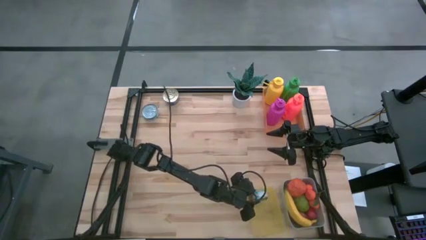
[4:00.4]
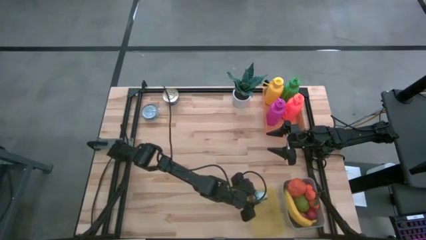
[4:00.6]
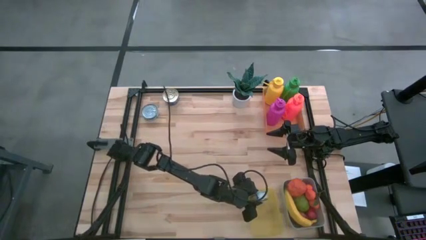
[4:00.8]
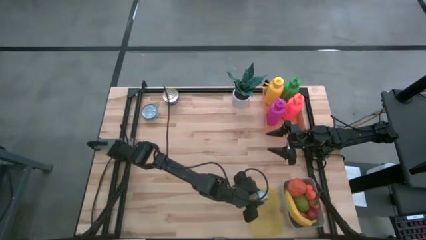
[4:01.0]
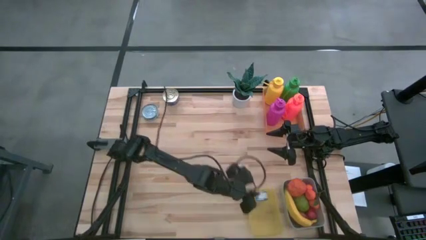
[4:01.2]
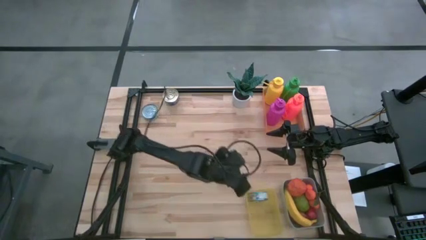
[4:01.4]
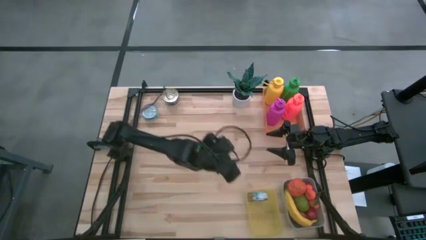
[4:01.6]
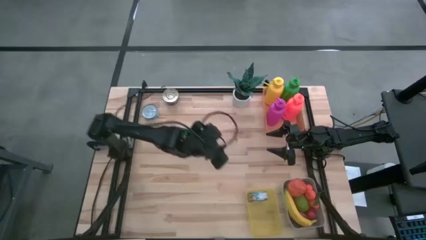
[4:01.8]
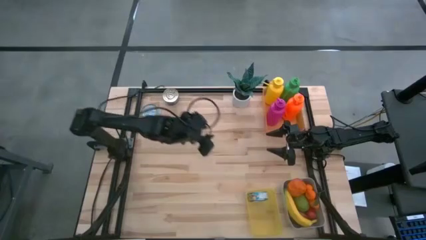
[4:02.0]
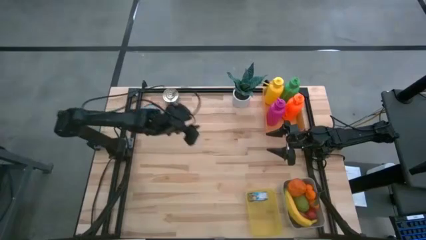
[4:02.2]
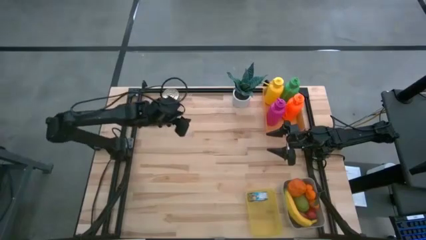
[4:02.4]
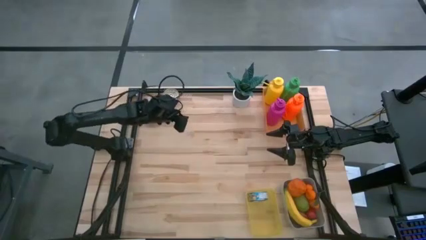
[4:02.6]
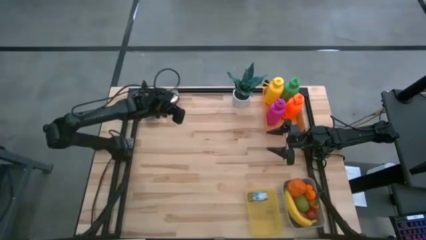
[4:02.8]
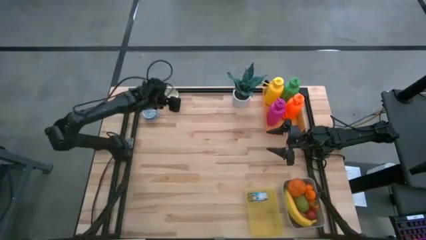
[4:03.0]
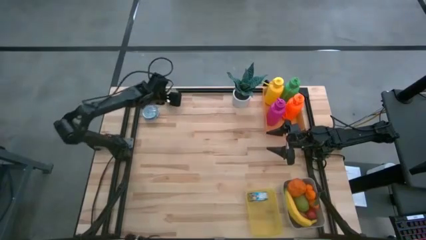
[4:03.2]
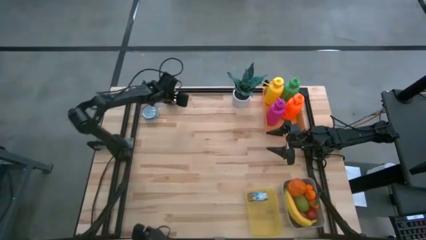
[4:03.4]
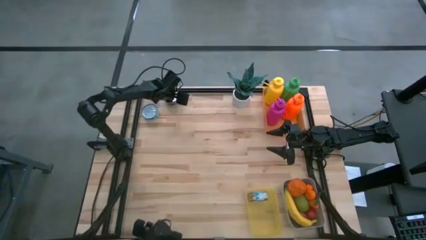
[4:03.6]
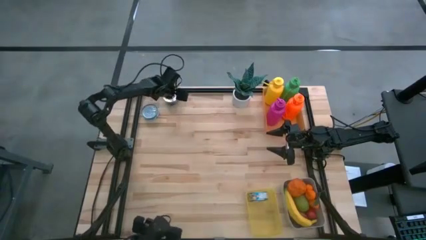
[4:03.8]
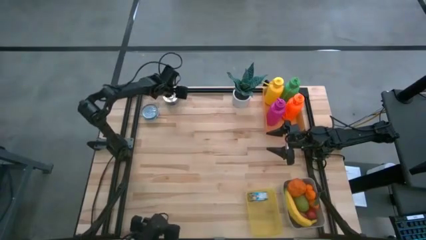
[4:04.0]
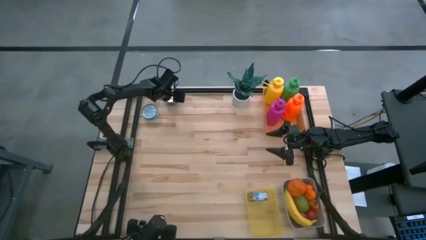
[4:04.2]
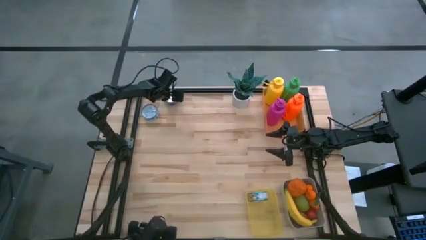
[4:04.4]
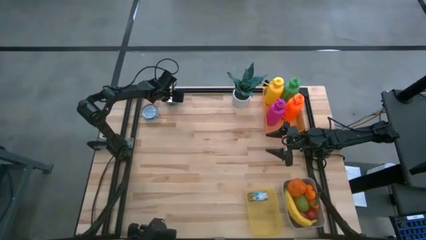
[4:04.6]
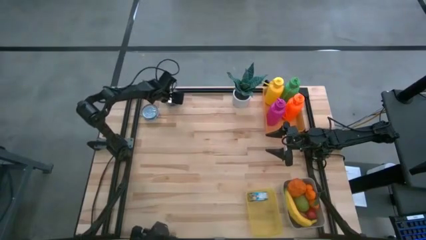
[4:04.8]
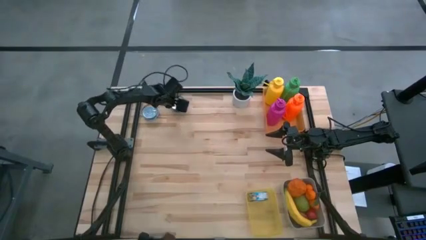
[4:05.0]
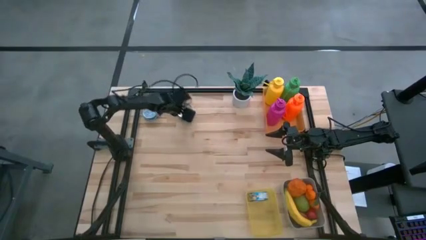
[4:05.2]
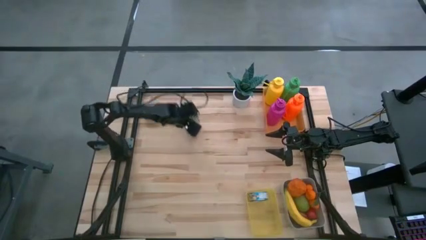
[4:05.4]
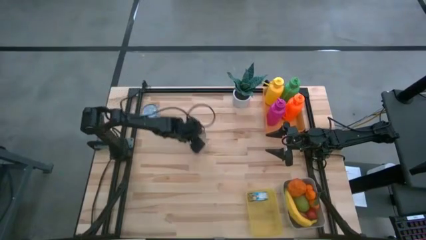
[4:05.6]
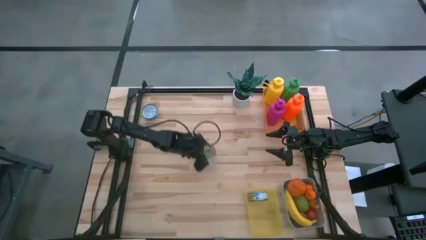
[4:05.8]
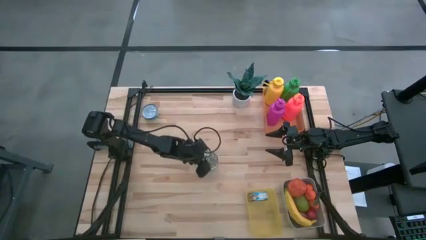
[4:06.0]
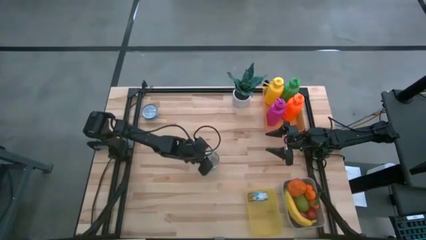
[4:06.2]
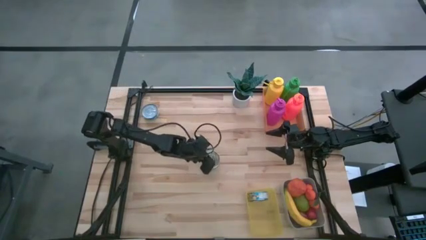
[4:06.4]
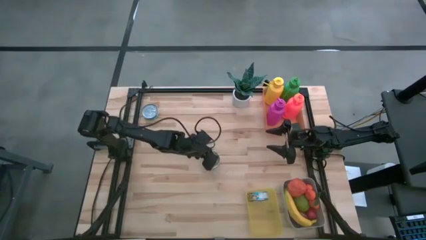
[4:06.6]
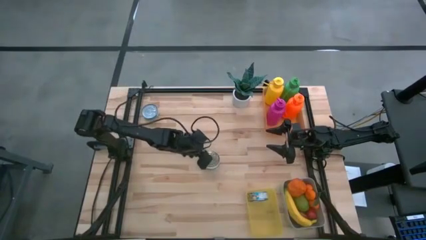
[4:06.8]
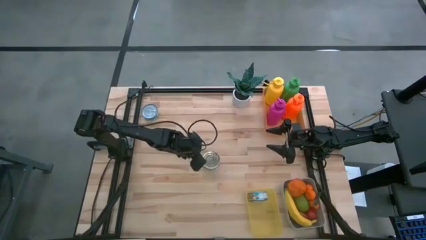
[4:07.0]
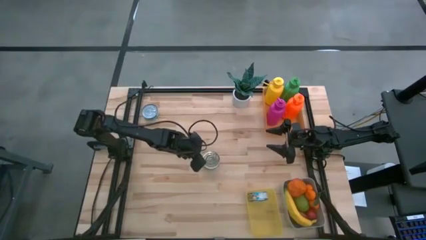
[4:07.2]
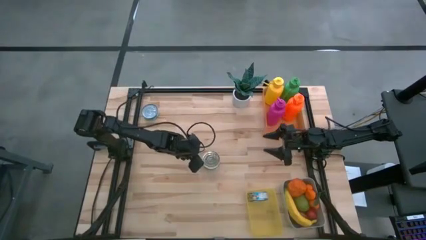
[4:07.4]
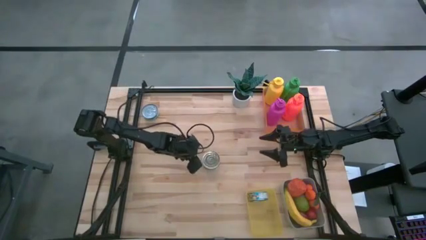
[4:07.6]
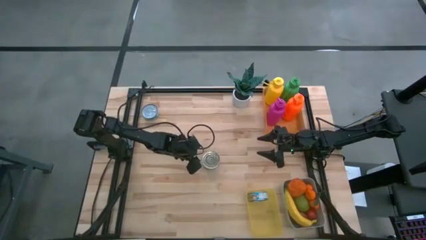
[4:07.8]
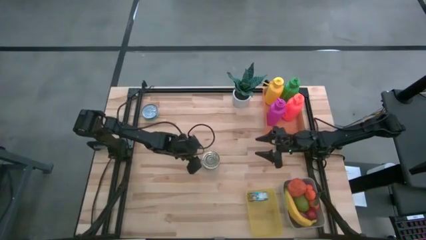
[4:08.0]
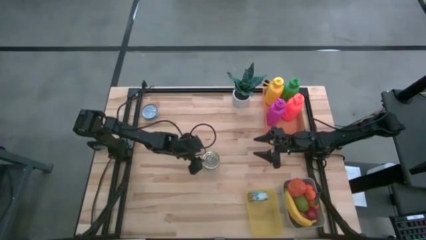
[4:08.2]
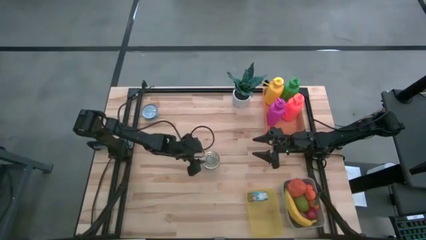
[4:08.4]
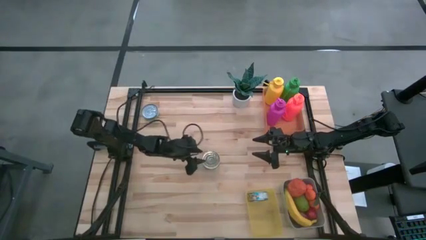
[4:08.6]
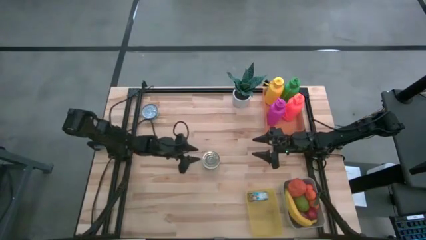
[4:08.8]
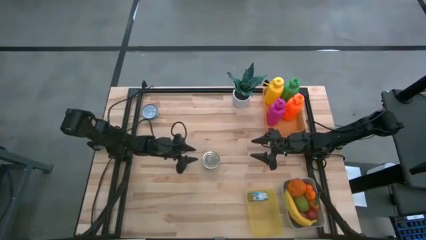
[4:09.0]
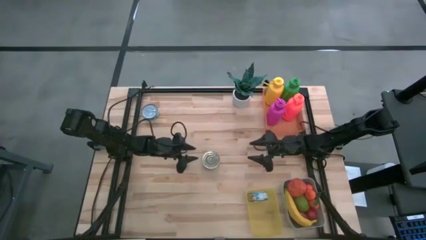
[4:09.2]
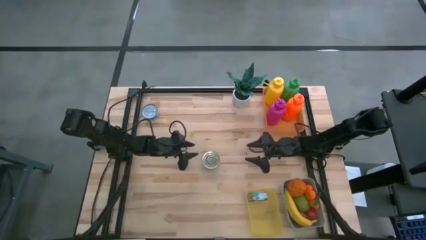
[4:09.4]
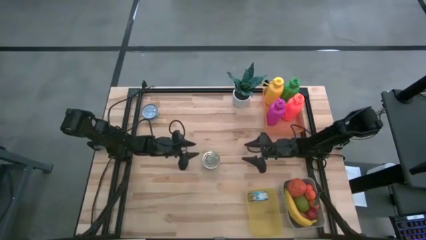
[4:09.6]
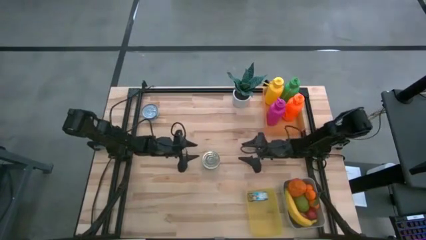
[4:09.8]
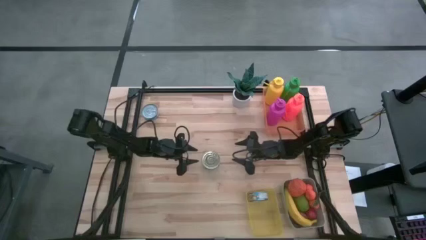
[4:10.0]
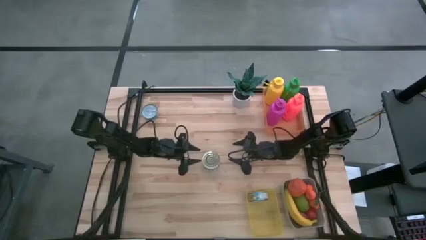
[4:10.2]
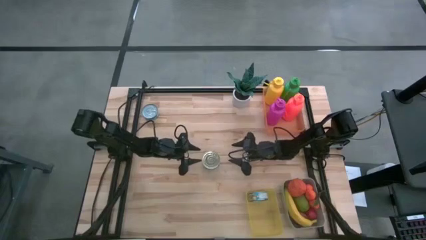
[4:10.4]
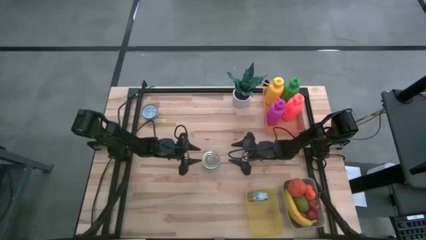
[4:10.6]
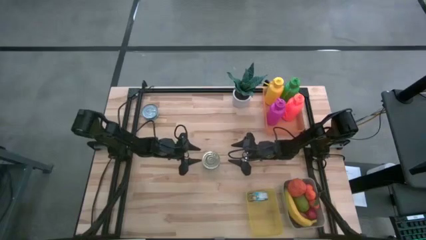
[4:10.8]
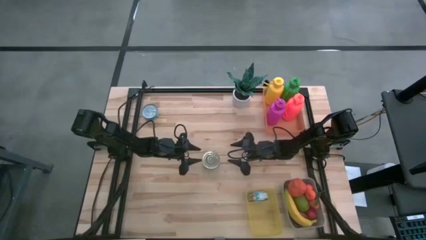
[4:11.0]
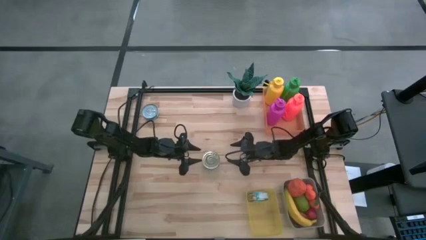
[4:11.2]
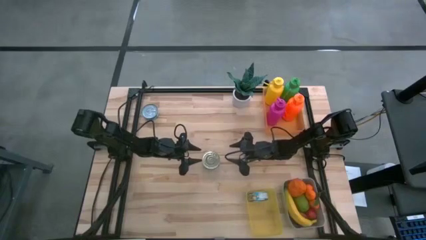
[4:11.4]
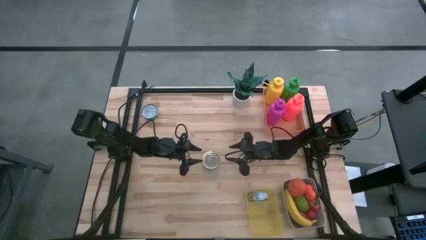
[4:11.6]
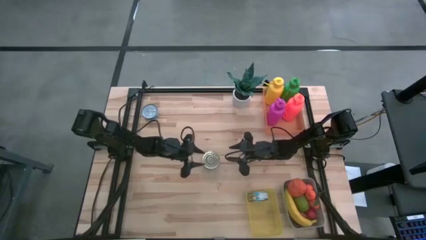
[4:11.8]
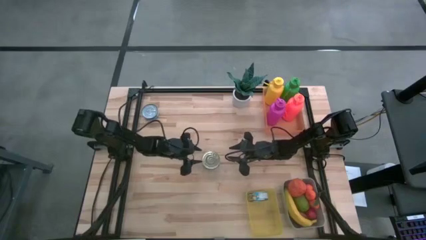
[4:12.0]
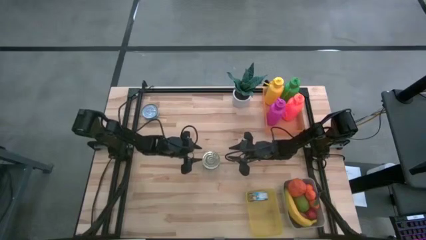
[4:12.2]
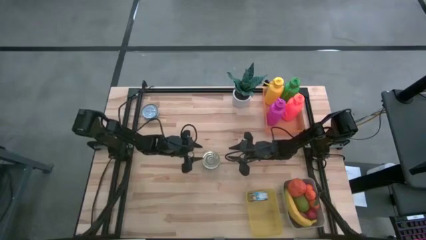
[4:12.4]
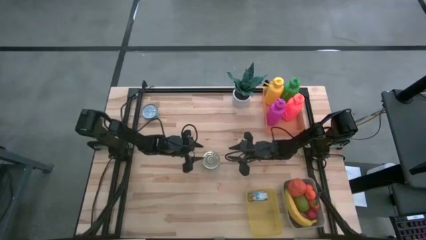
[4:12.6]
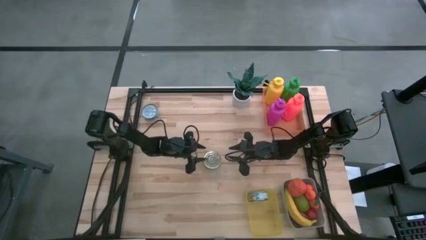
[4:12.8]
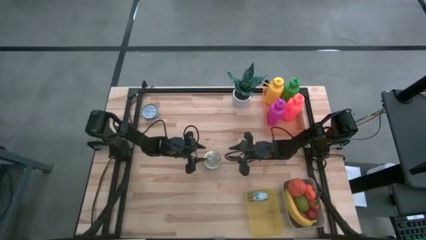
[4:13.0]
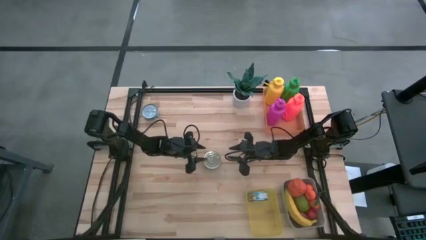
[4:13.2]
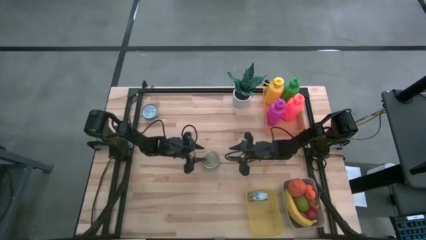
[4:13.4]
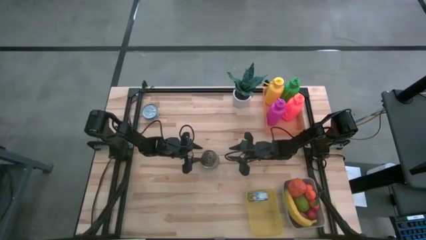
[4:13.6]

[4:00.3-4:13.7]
Task: Pick & Place Food Item
Put the blue and pink tuna can into the yellow bin
